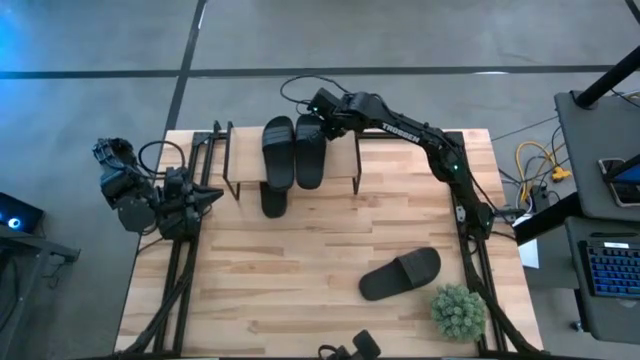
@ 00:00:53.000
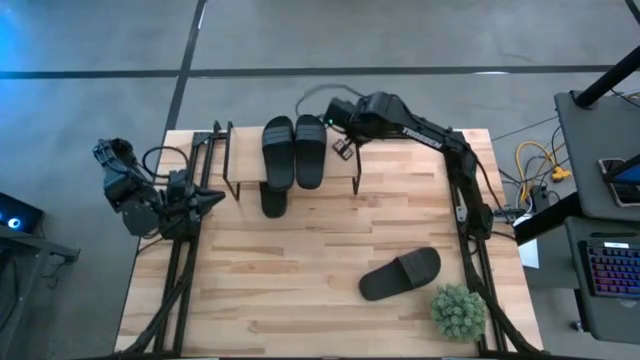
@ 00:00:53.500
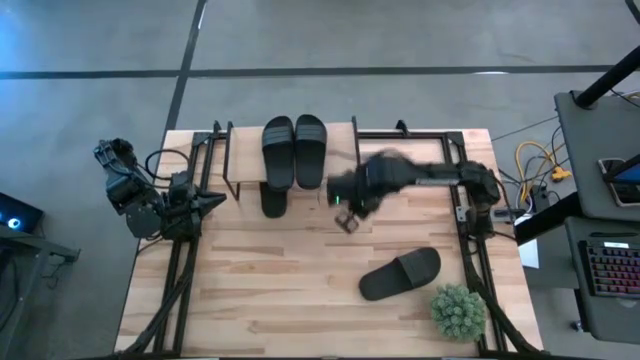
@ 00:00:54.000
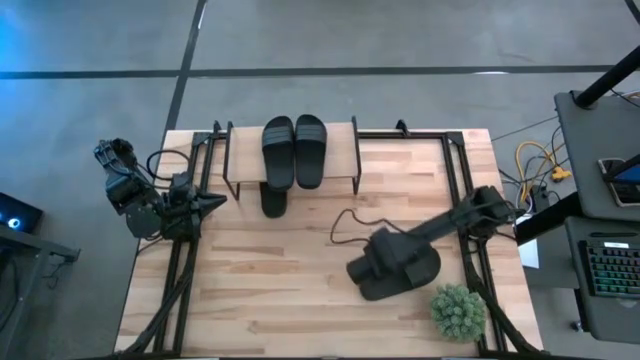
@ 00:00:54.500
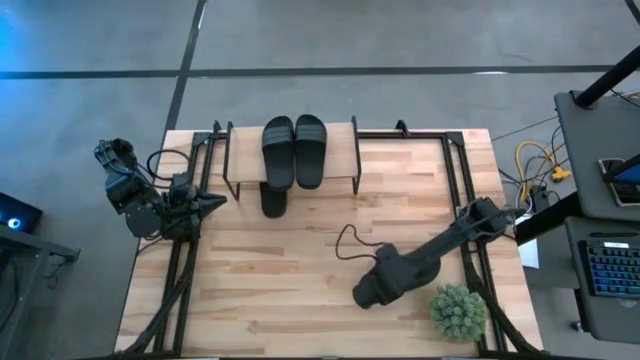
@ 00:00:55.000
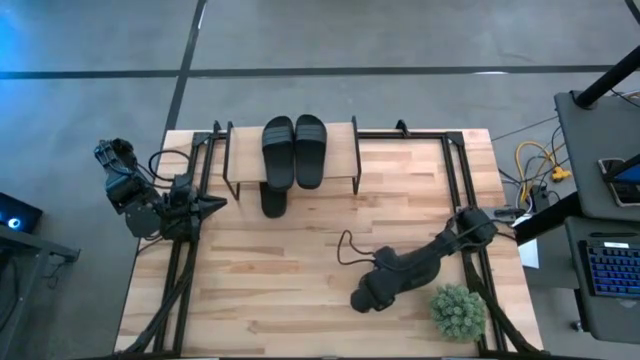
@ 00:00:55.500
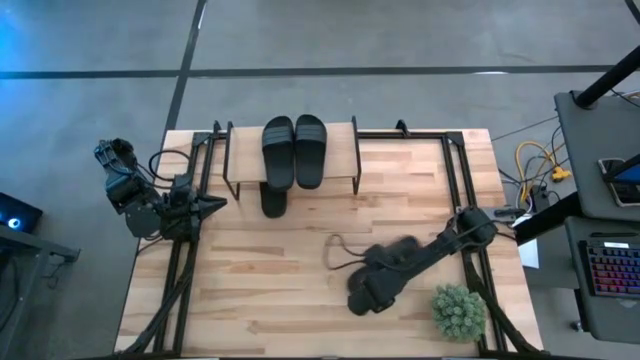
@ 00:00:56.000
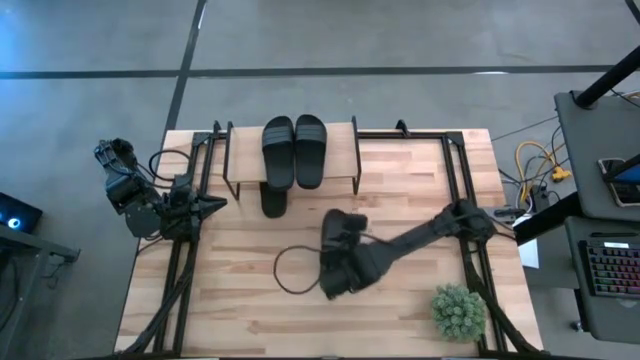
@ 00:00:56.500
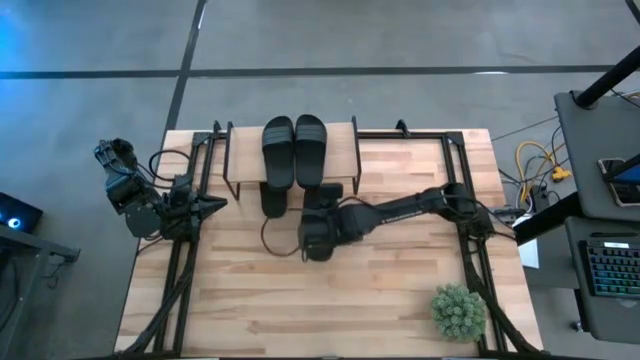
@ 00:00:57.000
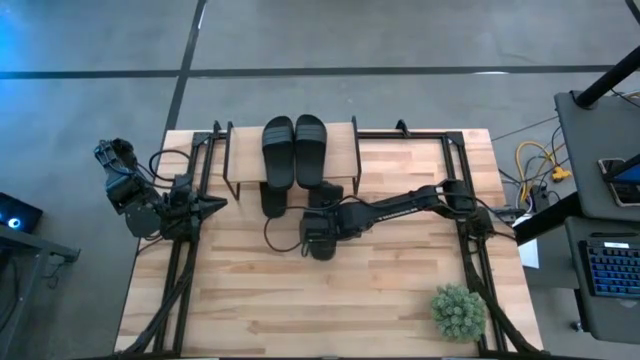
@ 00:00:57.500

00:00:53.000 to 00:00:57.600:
Task: Pick and place slides into the shelf
Put the big black slide under the shelf

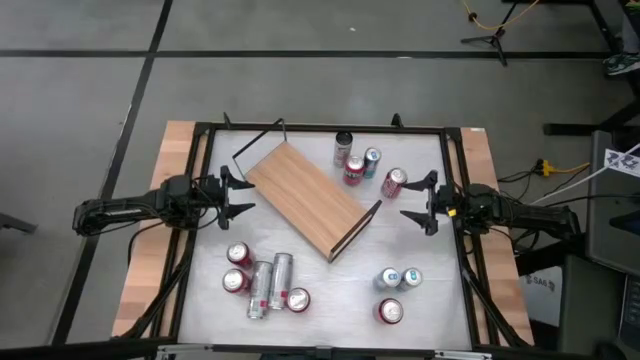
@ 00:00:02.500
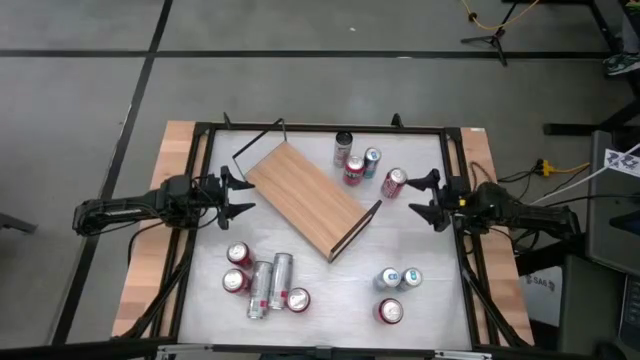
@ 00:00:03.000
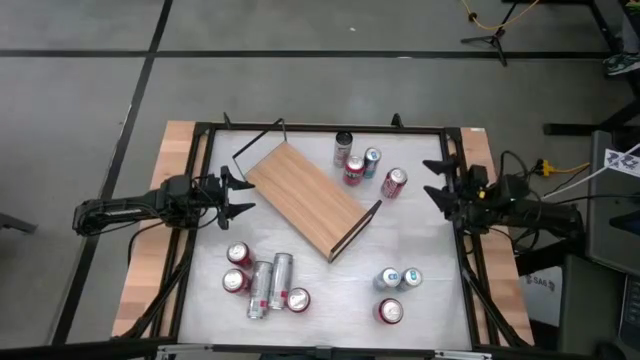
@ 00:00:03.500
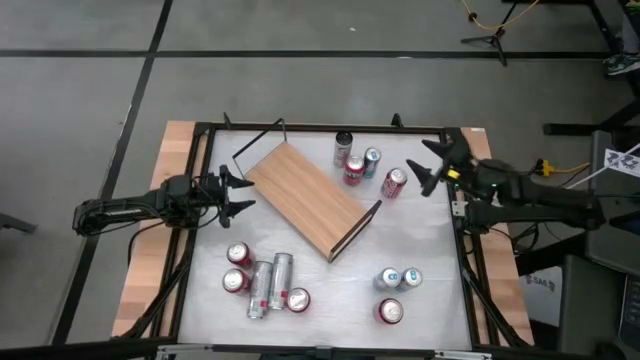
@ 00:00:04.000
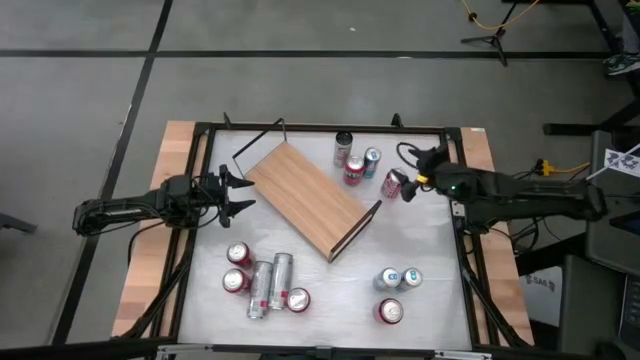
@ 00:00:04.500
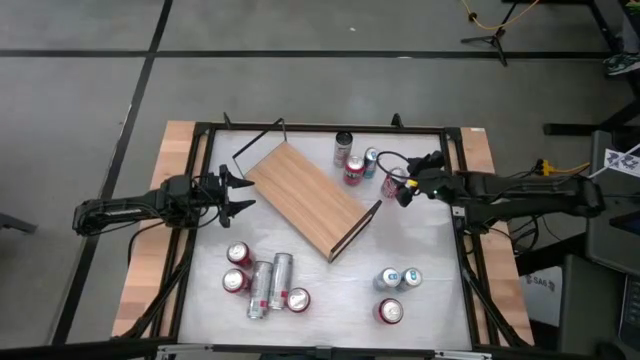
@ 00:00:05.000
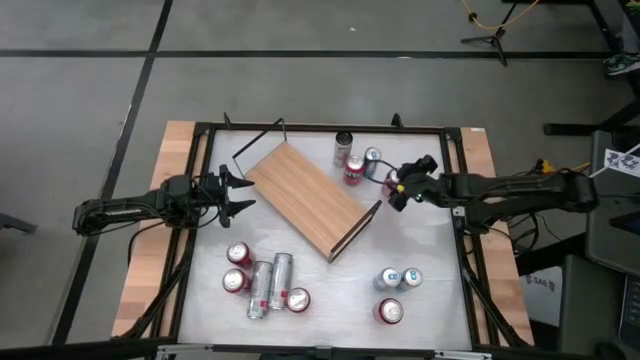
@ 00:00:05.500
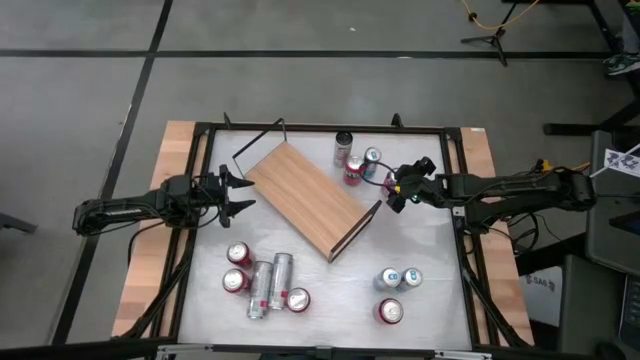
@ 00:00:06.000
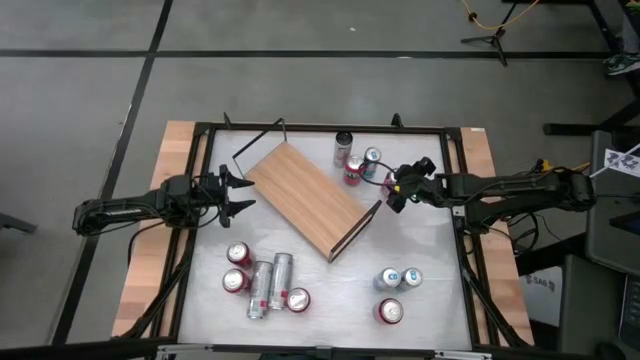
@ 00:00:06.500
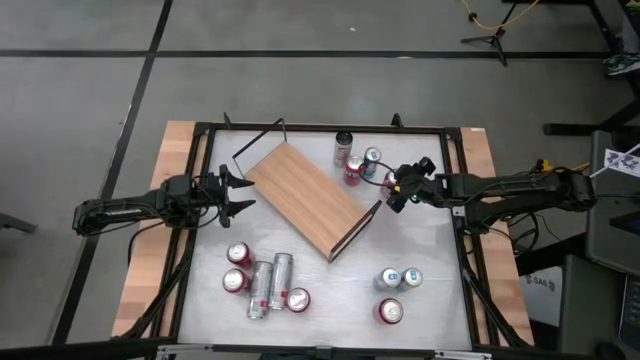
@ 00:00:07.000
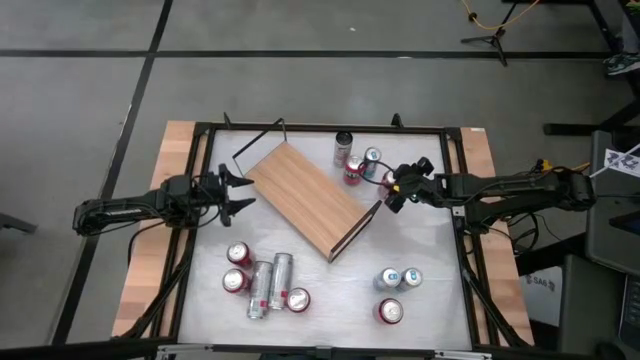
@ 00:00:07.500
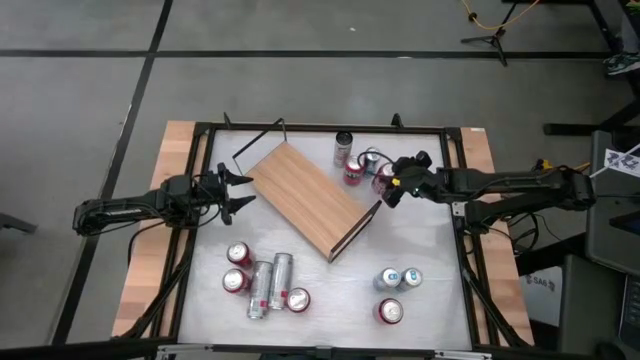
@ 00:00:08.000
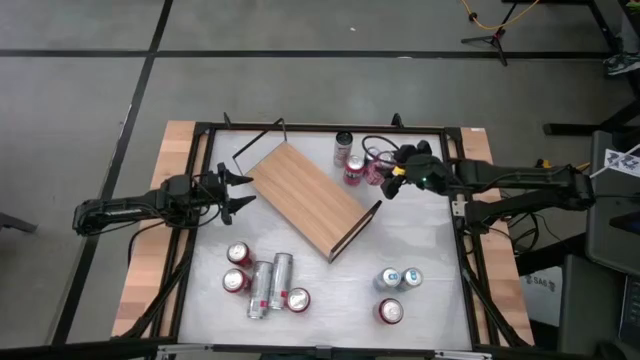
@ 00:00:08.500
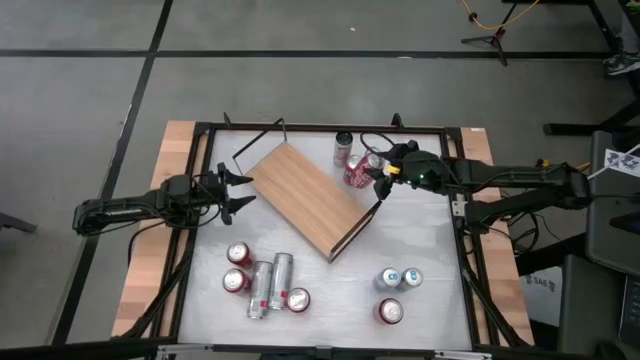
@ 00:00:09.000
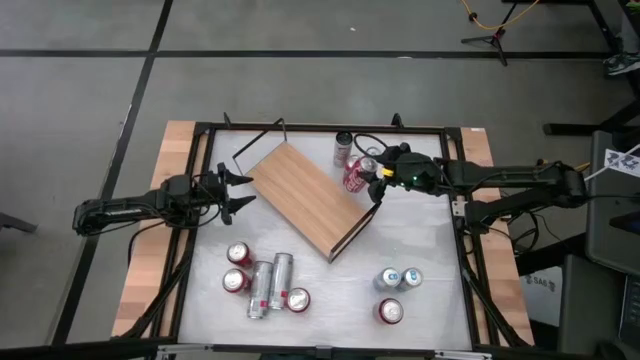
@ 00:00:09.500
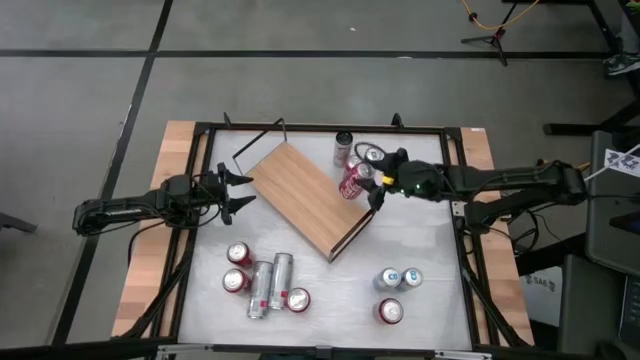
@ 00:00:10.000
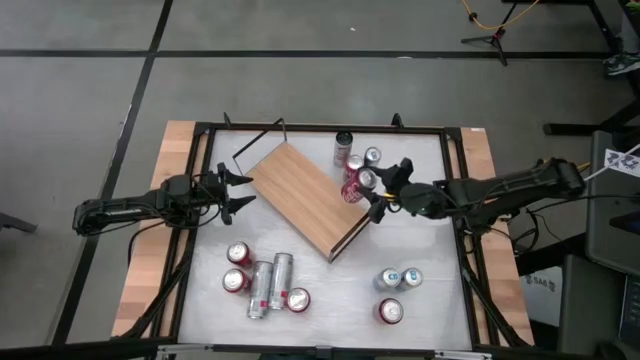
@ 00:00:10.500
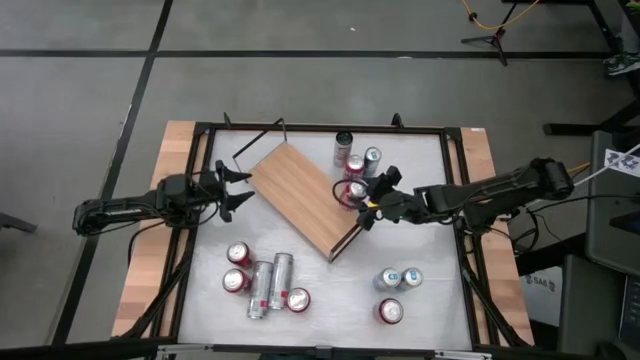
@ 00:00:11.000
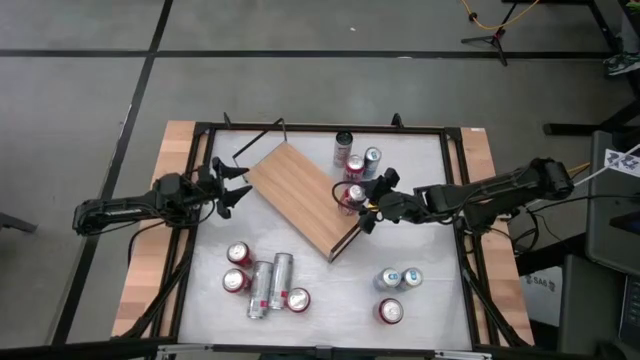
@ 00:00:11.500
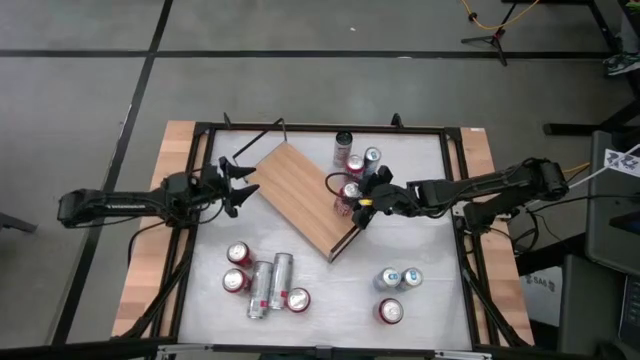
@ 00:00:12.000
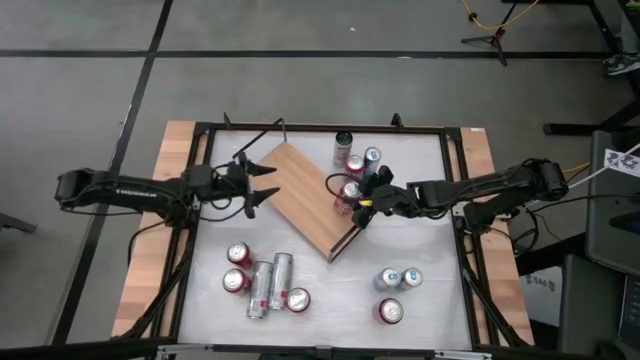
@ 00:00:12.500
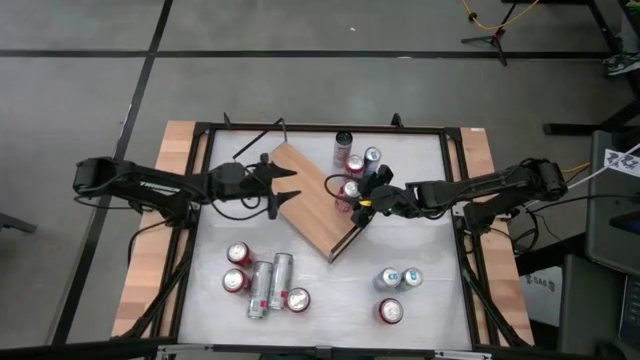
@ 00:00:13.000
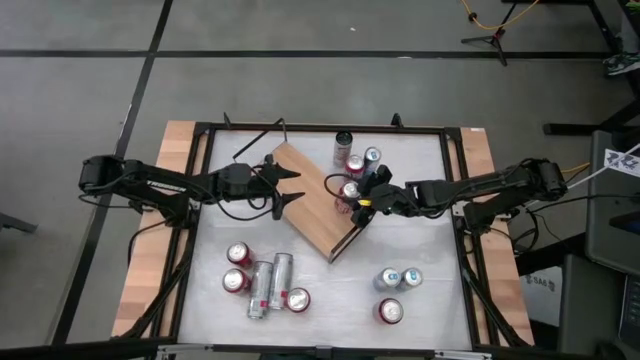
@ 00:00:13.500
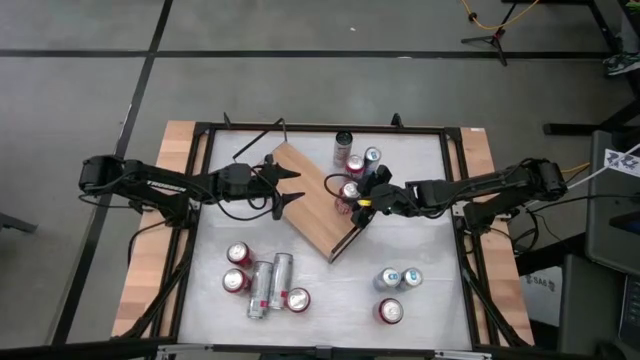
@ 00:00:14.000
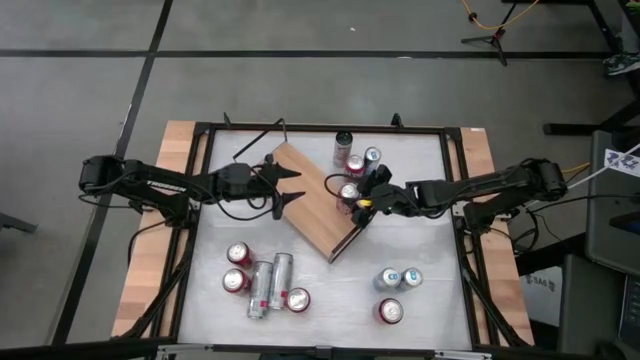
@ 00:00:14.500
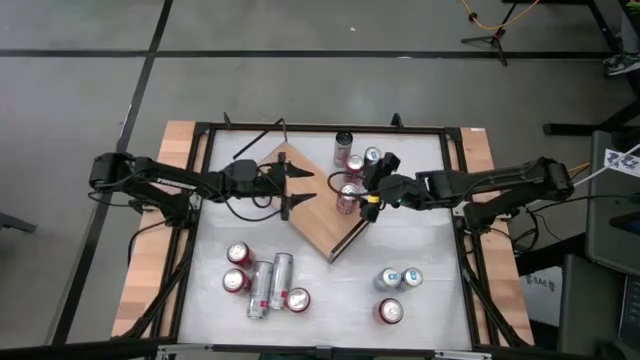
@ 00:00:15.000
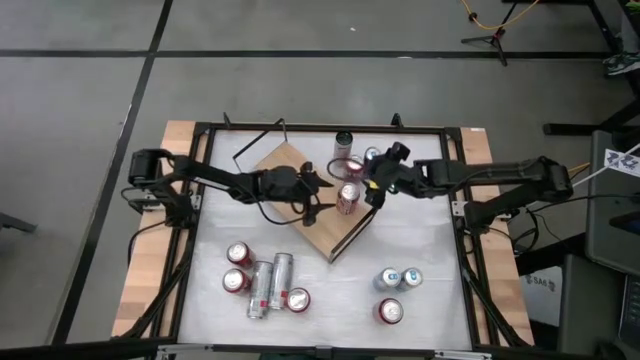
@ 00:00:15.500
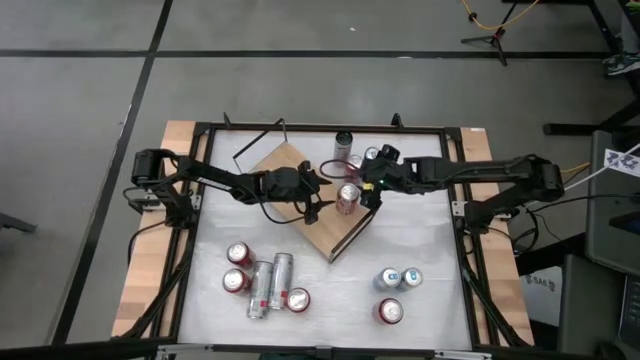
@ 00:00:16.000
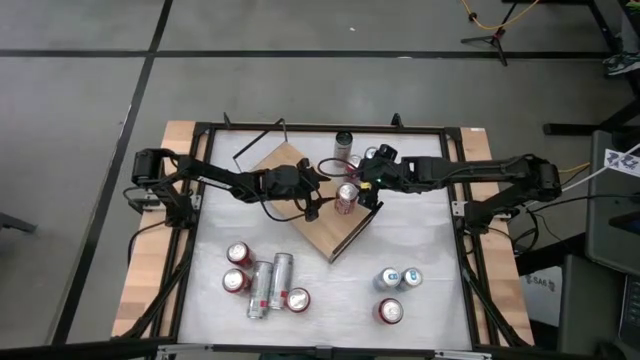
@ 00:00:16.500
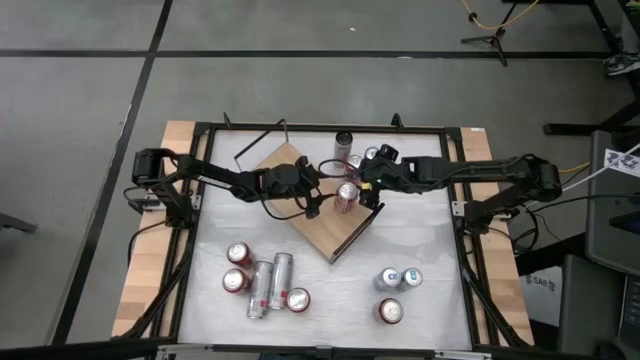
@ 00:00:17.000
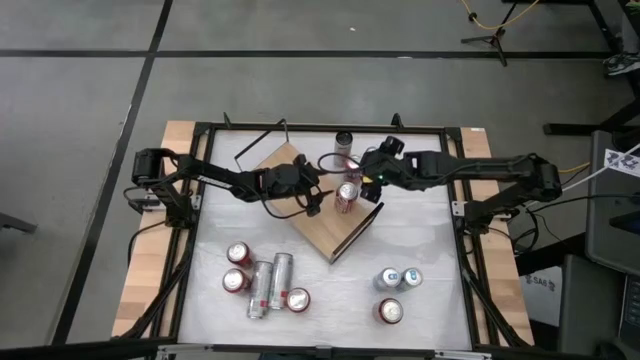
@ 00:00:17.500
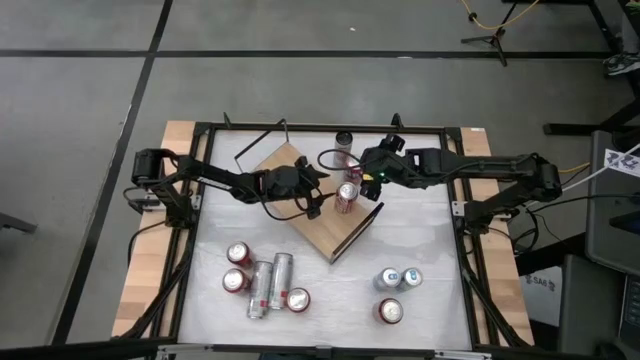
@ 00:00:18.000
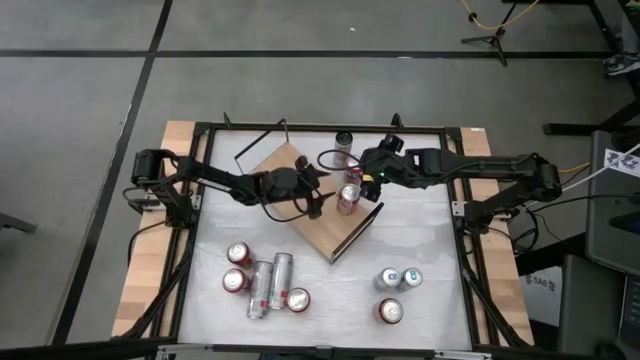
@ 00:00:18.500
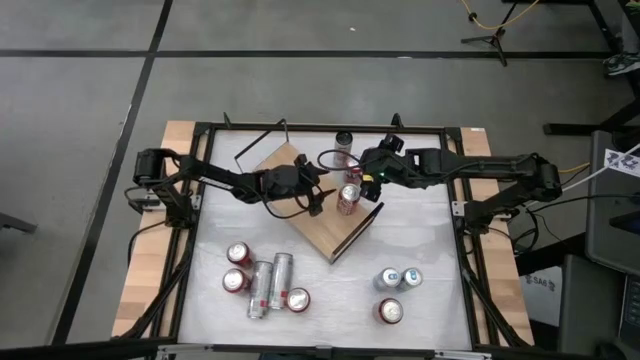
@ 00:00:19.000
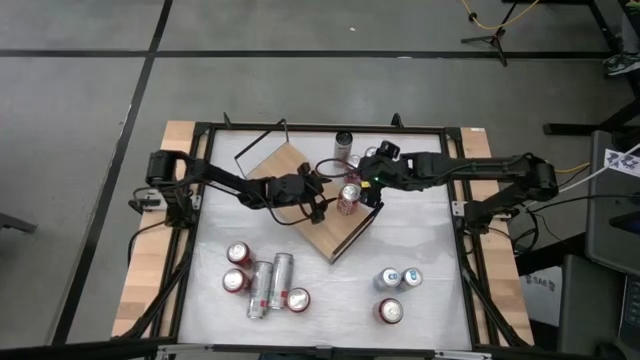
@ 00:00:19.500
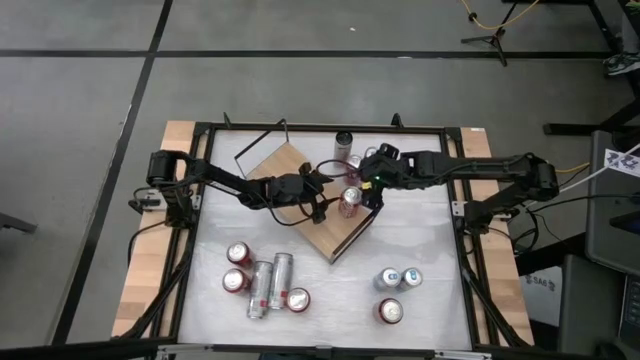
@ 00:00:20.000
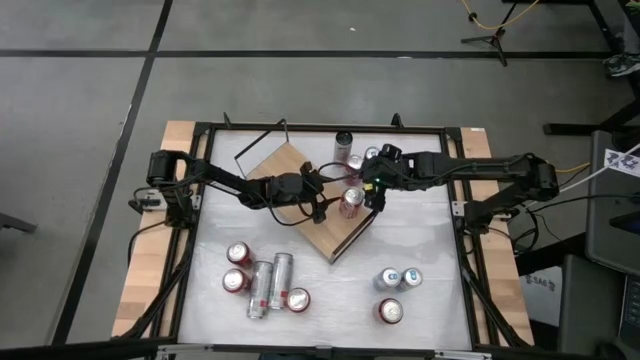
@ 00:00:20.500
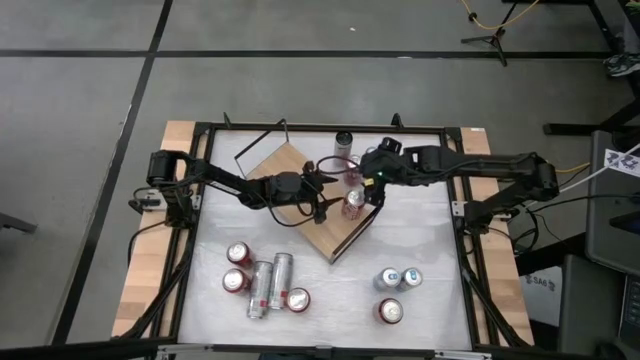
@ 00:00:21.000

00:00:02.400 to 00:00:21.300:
Task: Place canned beverage on shelf
Put the red white soda can on the shelf
